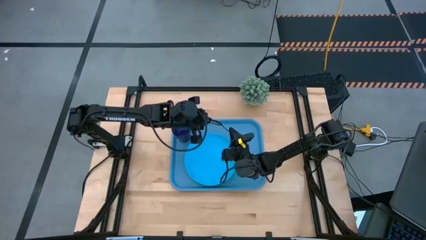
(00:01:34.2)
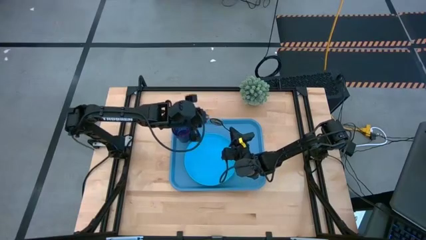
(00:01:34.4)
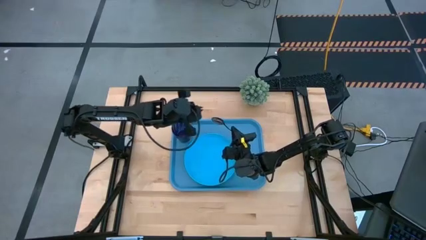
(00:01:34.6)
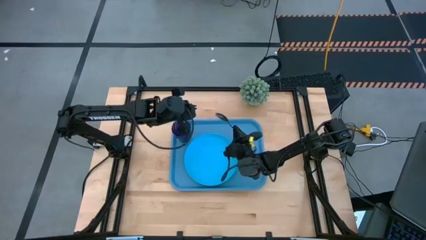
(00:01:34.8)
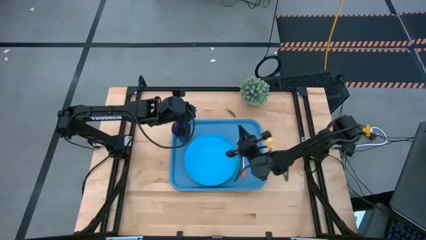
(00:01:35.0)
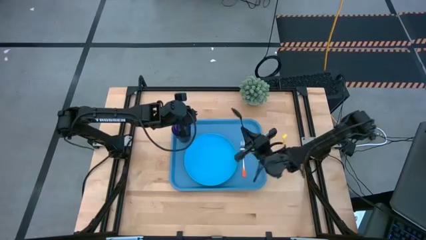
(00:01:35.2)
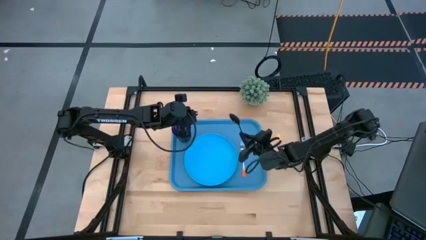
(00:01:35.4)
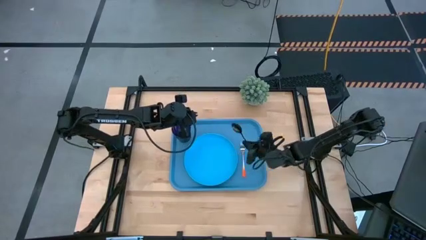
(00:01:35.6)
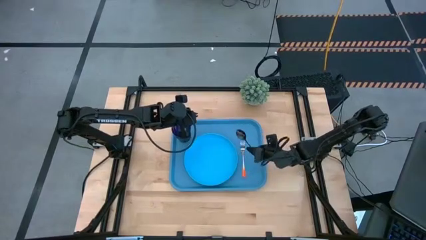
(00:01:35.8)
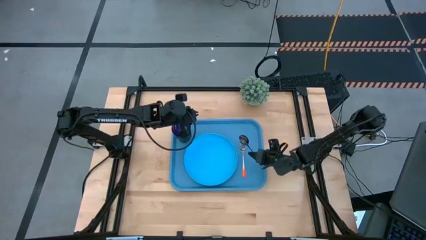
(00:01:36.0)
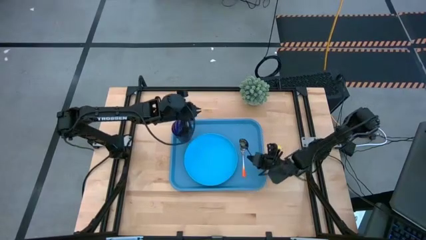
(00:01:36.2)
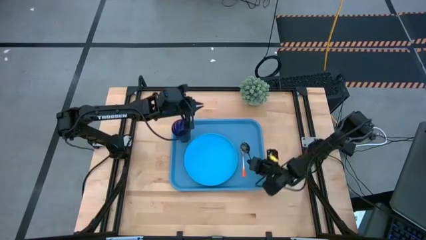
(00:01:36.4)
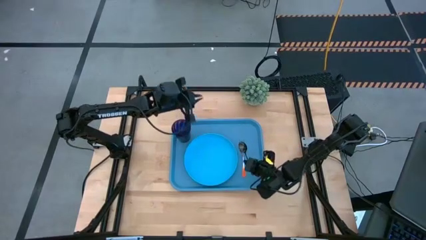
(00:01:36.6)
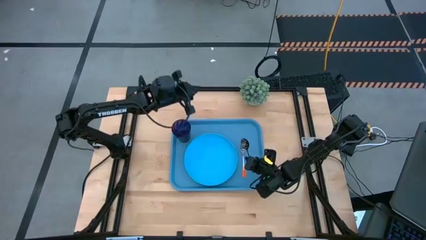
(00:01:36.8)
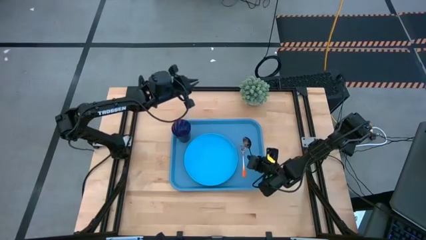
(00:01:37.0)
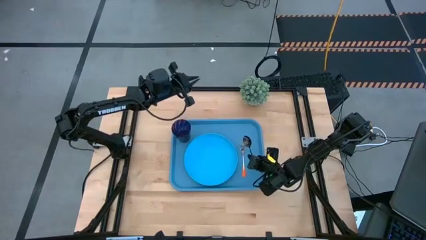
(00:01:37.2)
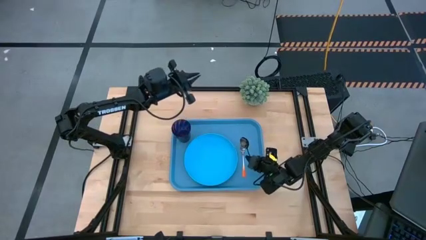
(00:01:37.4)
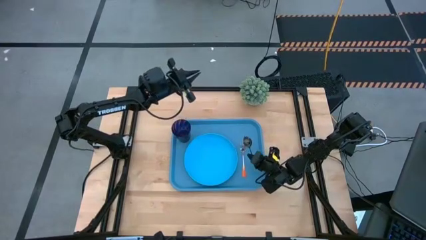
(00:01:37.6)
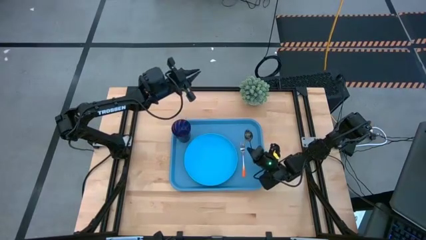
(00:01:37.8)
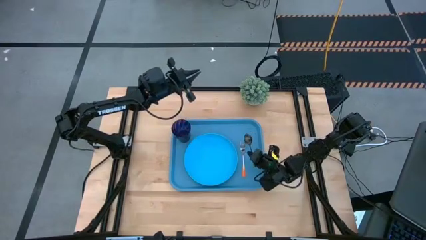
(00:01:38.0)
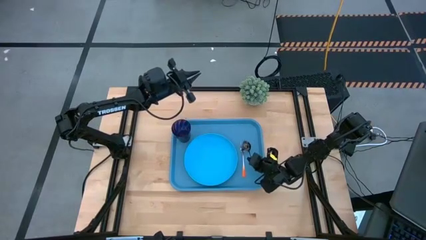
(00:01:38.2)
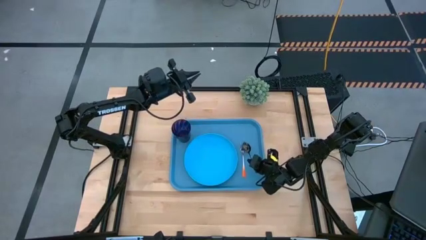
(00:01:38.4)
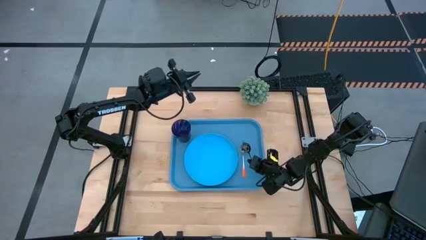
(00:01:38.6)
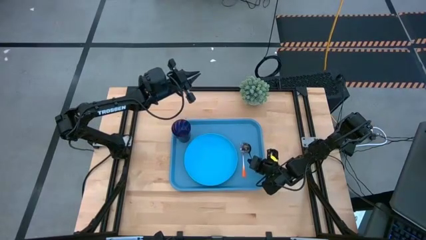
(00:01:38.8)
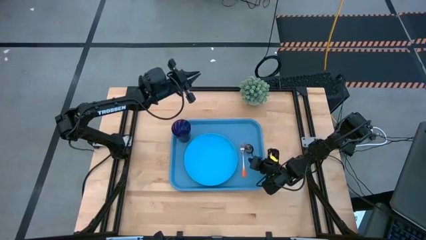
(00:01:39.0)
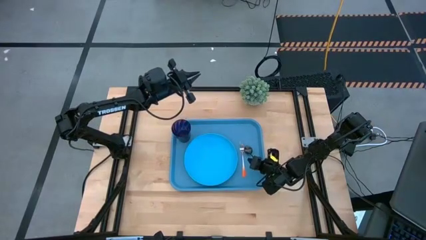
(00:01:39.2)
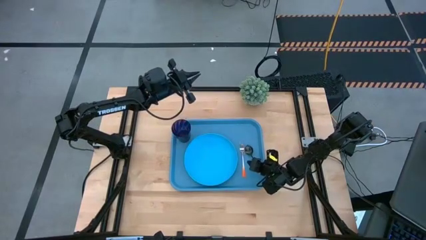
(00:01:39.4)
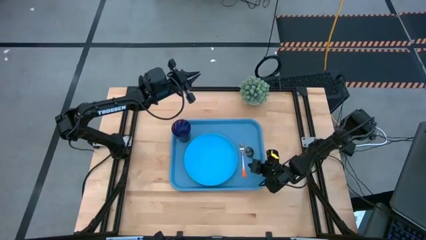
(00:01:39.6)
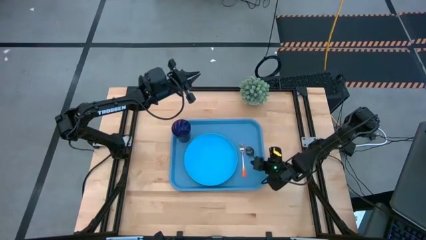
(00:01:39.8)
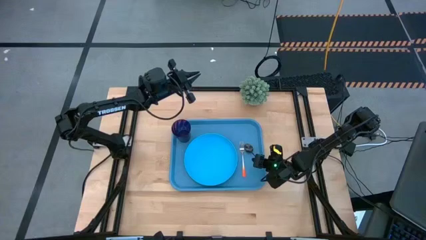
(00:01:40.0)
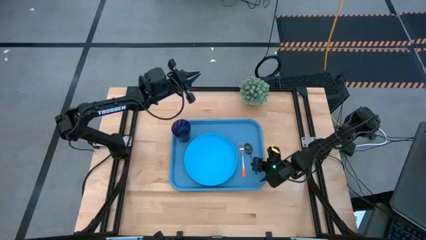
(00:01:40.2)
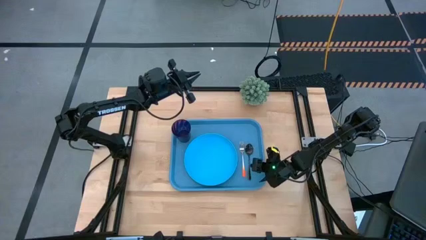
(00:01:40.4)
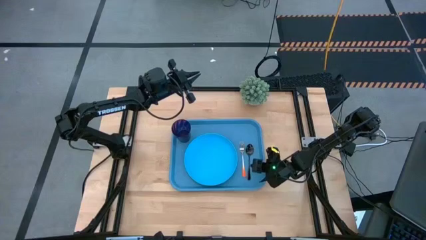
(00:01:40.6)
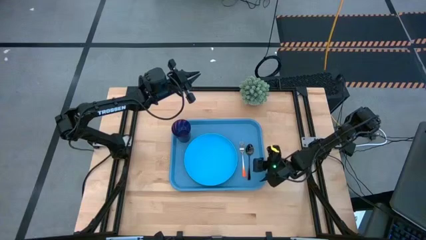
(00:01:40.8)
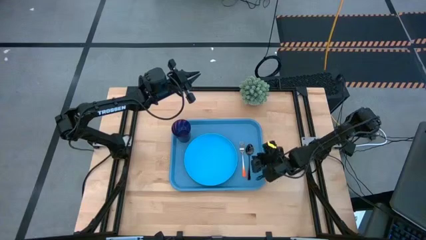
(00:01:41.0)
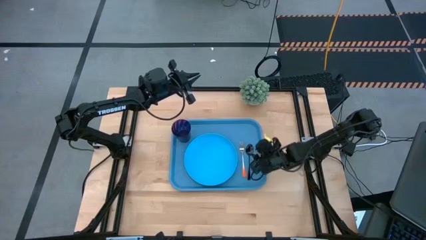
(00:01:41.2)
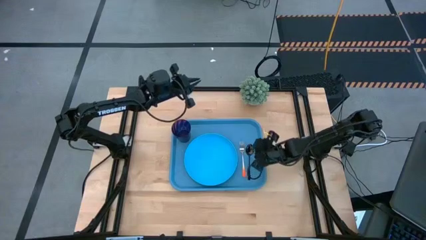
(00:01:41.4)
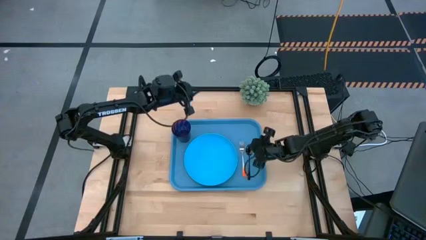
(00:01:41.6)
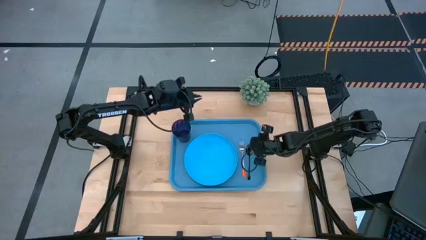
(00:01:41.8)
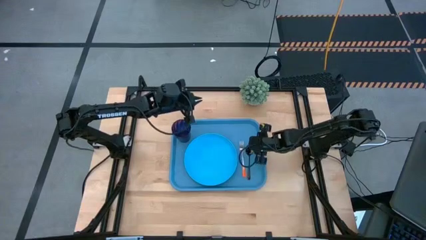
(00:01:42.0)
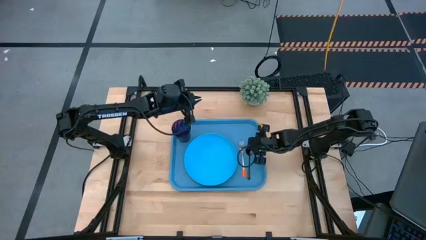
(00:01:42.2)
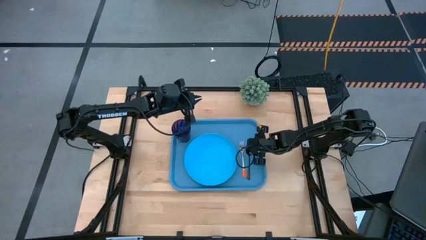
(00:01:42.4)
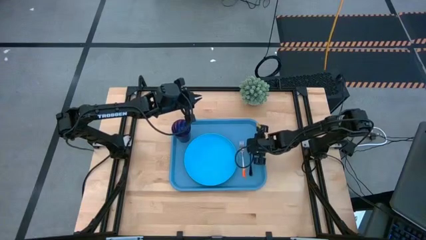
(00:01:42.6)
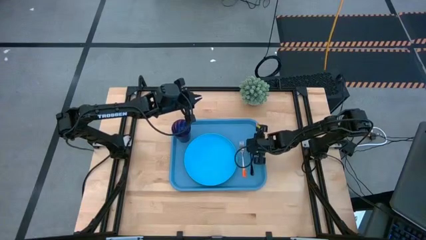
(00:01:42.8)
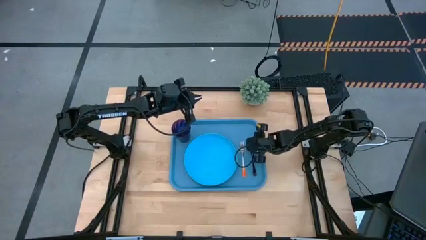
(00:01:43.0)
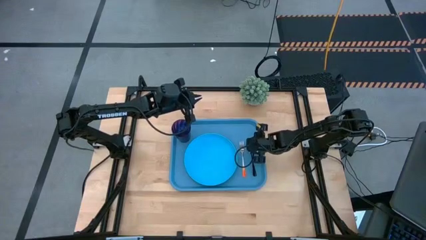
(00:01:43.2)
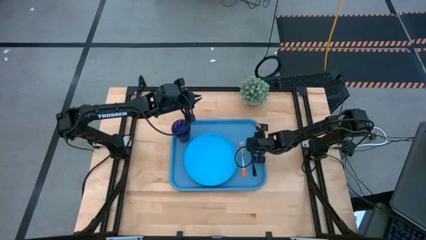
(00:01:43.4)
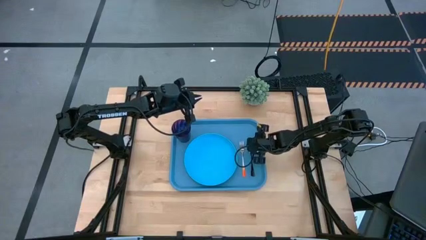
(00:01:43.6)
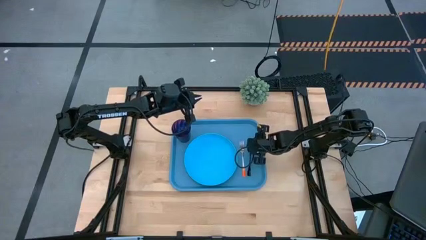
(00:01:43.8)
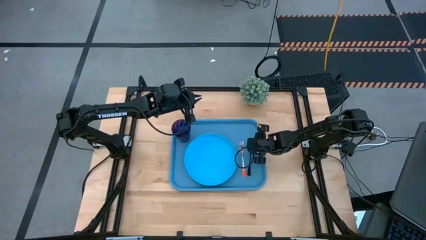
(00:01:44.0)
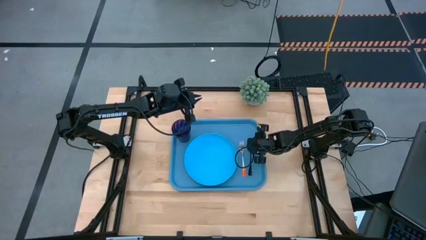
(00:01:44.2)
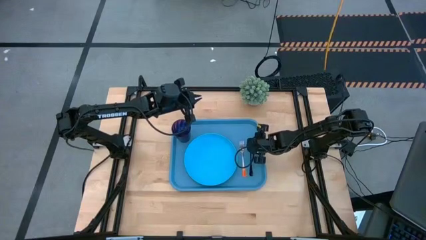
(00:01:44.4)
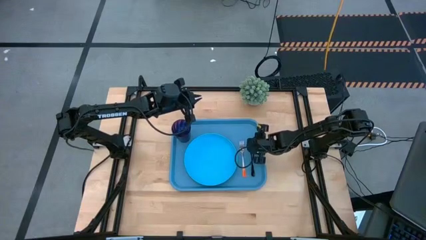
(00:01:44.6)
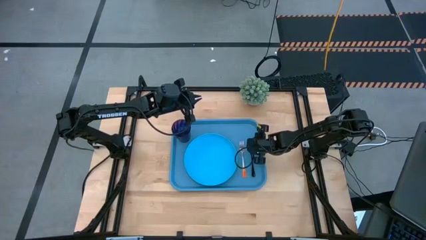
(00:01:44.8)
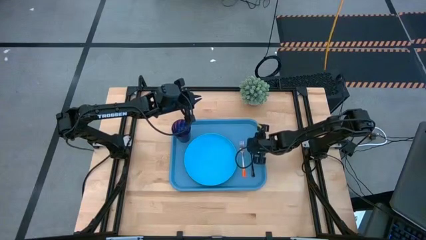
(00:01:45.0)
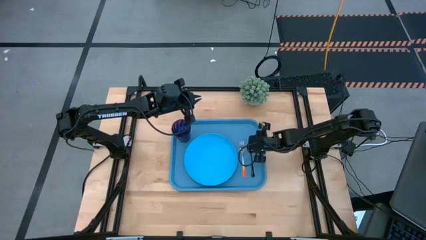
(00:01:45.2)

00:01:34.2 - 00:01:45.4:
Task: Pick and place plate/cup/fork/spoon on tray
Adjust the black spoon

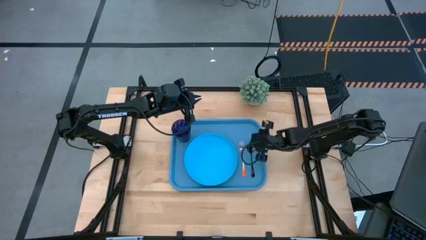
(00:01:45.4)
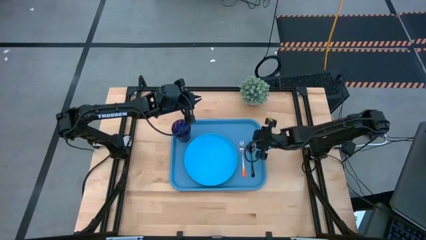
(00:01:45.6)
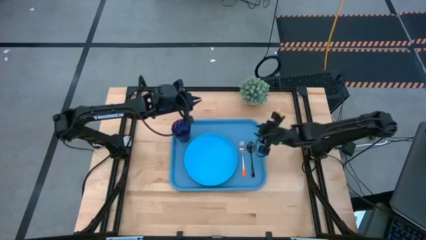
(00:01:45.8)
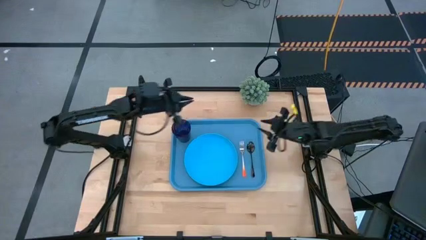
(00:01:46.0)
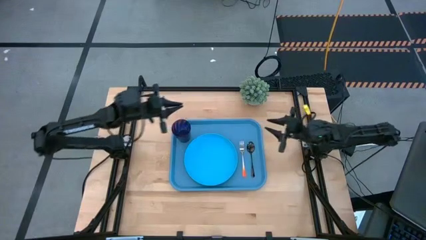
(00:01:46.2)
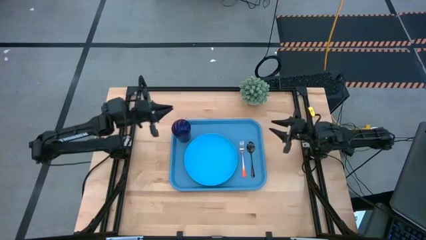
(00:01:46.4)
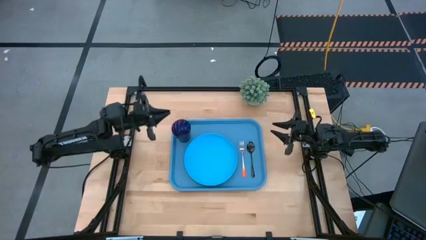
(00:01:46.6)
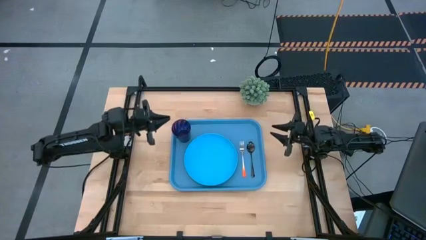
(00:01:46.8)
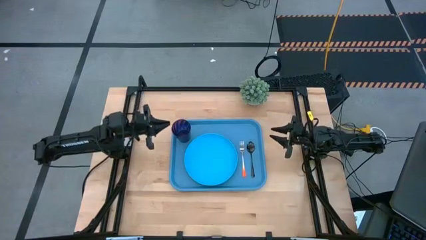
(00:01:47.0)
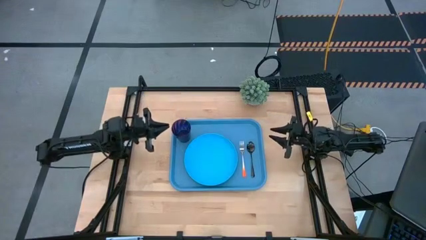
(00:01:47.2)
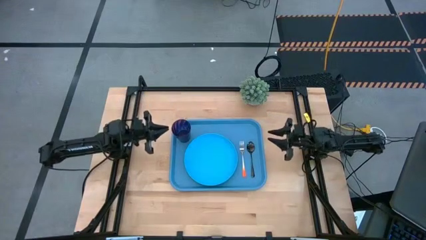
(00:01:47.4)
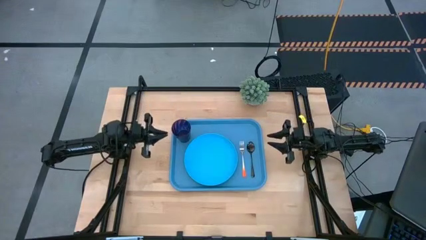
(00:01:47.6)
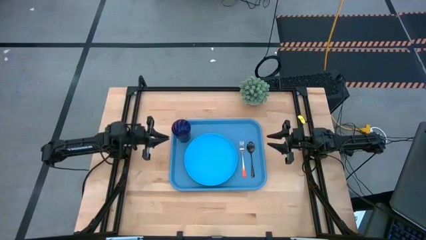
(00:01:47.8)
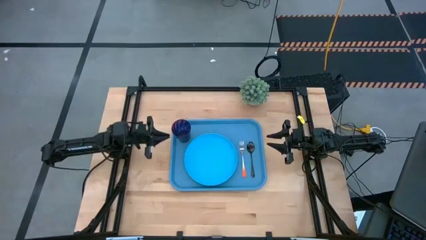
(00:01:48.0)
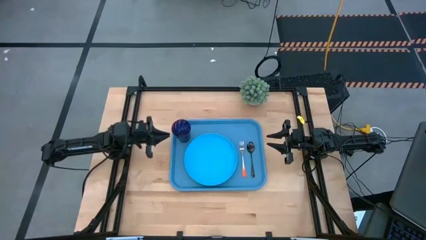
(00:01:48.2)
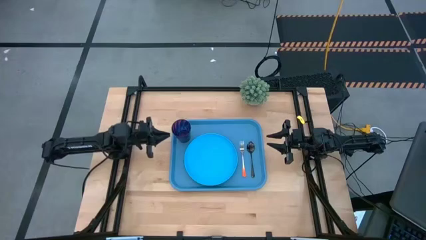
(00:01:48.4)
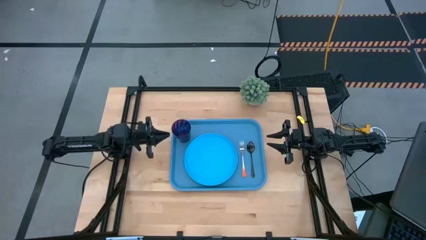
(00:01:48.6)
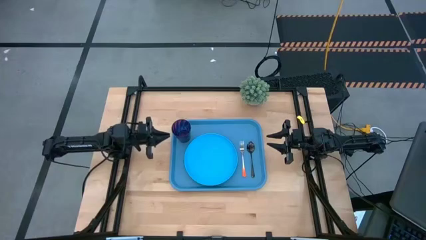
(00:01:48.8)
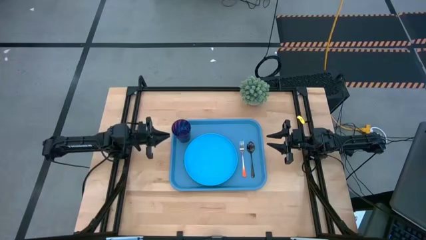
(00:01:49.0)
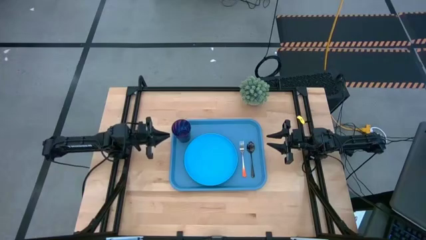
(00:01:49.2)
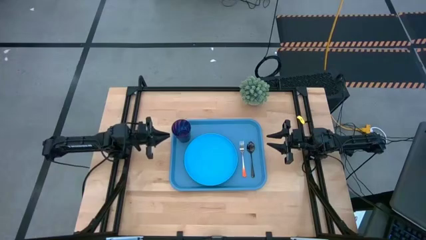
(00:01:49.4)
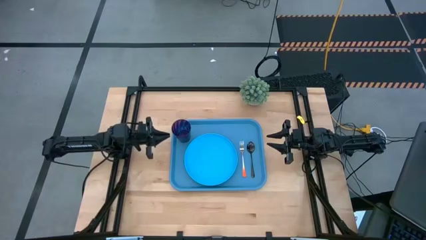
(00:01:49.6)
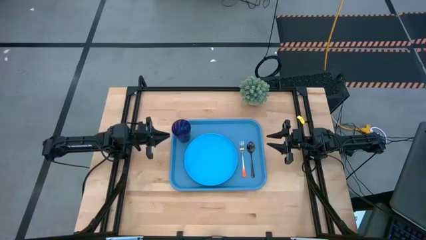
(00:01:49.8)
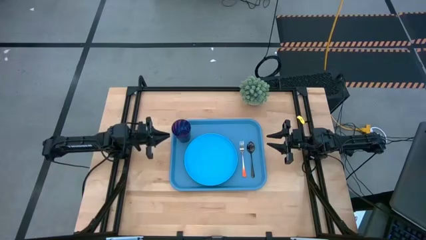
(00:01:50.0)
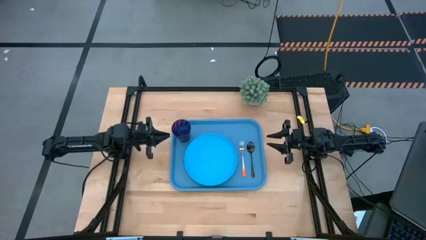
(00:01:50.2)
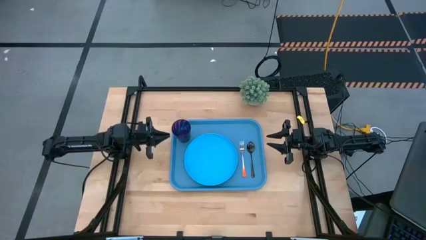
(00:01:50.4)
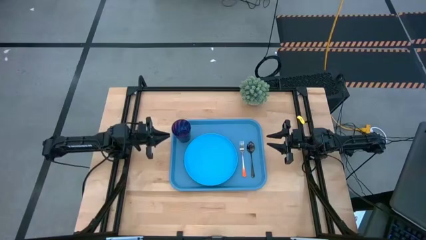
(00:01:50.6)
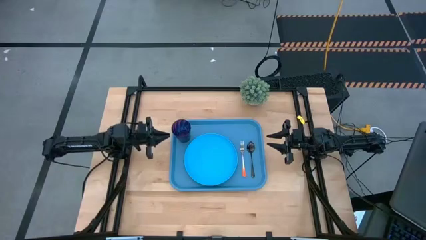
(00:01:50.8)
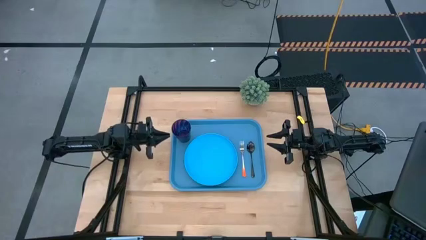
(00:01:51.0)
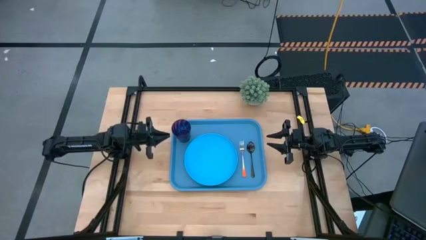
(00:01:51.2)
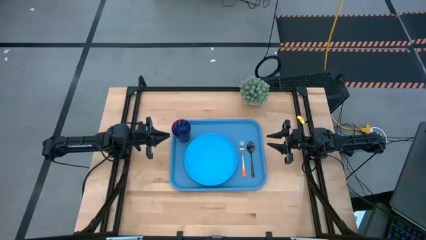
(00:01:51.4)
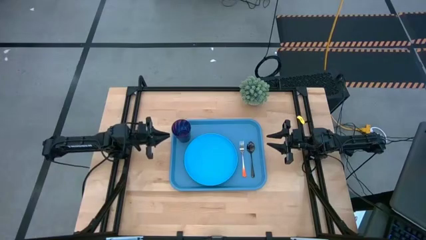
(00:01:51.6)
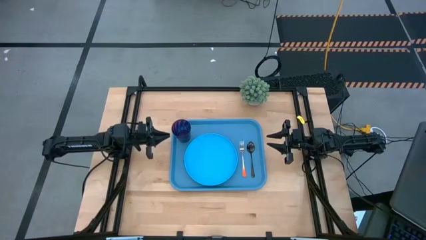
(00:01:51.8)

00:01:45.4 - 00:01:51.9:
Return To Home Position
